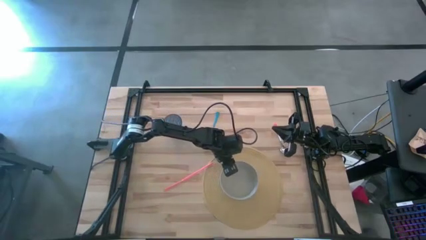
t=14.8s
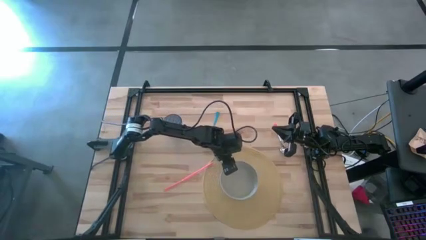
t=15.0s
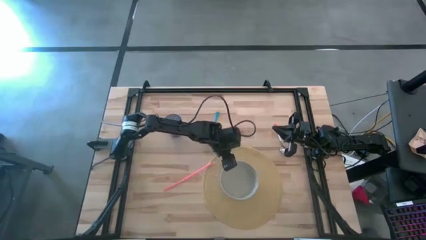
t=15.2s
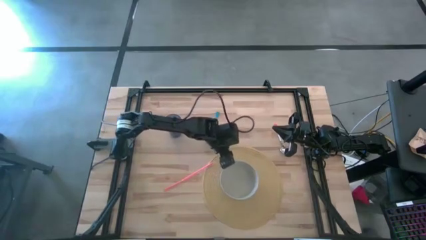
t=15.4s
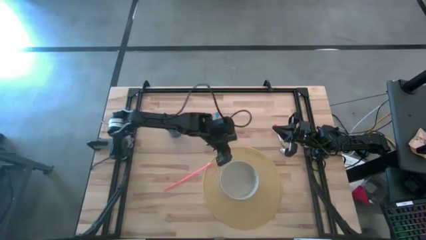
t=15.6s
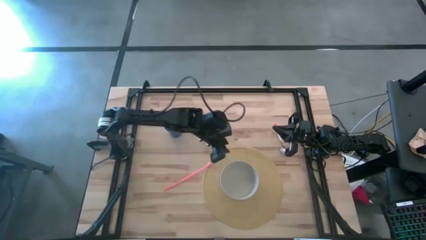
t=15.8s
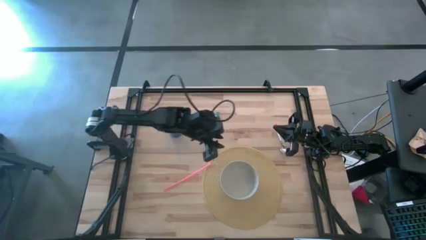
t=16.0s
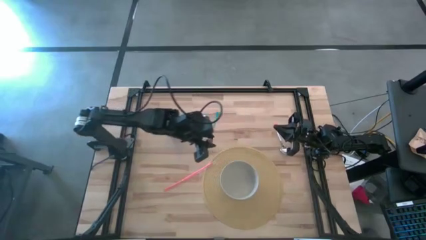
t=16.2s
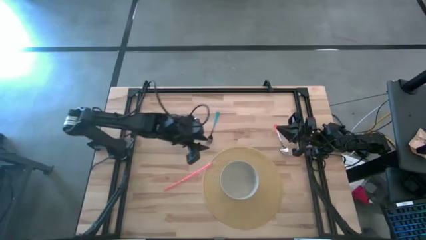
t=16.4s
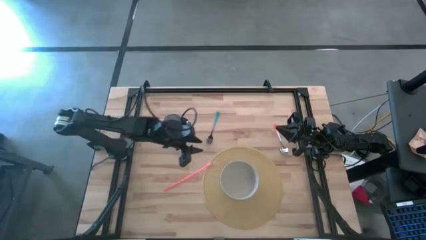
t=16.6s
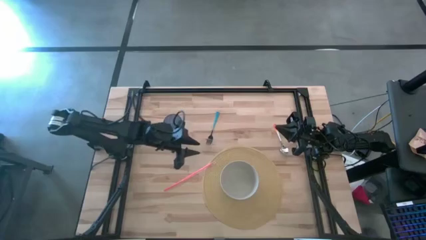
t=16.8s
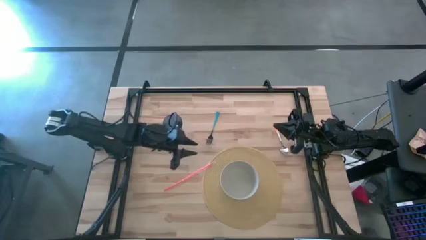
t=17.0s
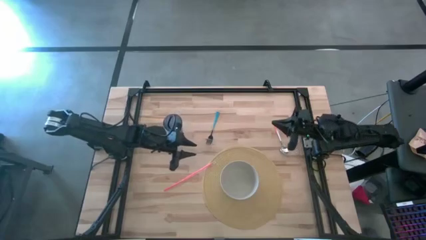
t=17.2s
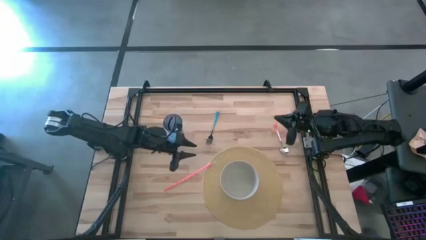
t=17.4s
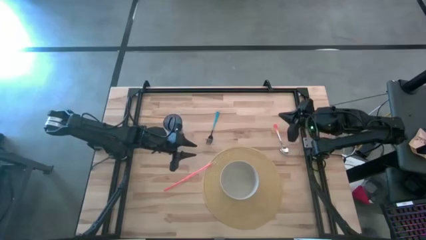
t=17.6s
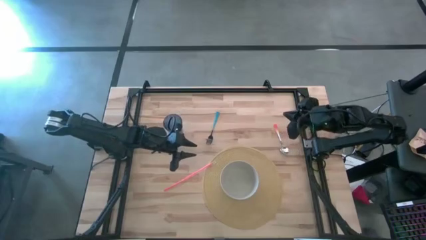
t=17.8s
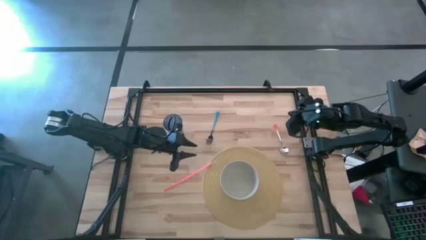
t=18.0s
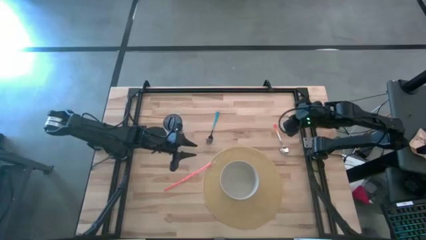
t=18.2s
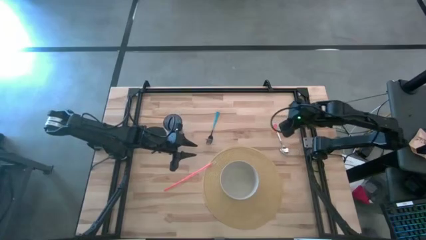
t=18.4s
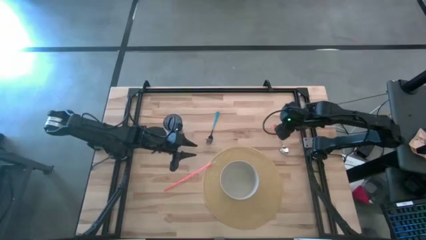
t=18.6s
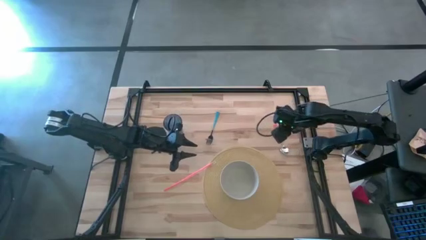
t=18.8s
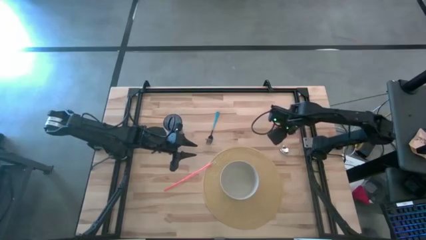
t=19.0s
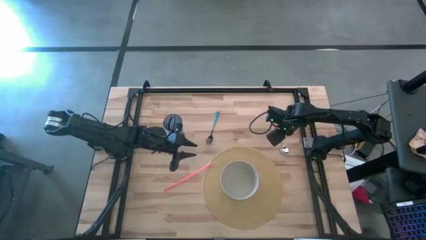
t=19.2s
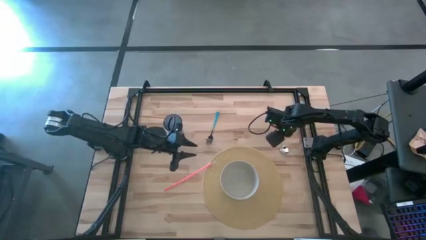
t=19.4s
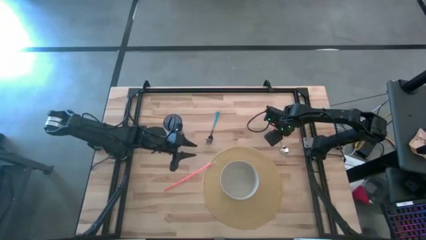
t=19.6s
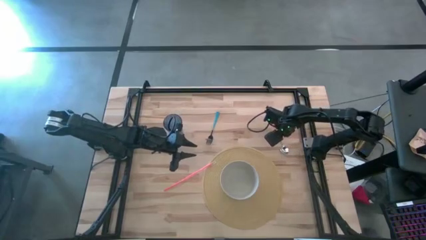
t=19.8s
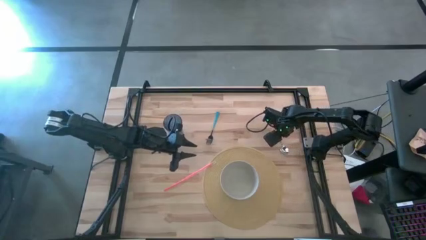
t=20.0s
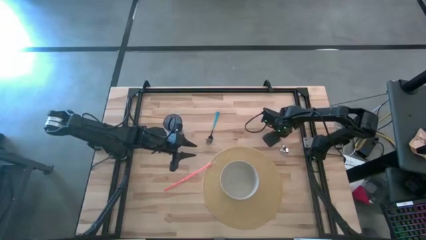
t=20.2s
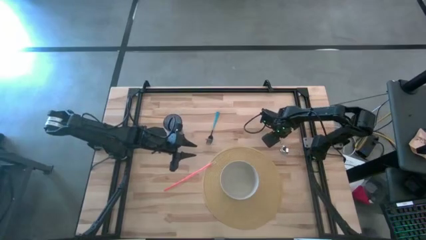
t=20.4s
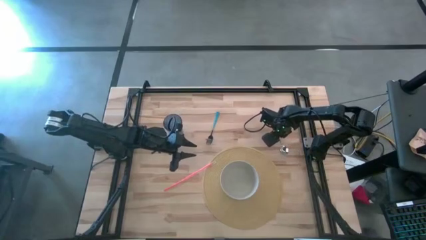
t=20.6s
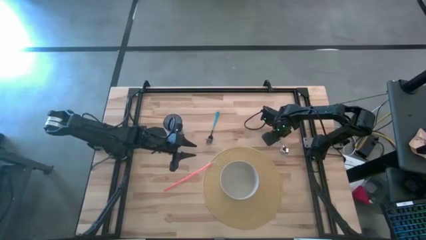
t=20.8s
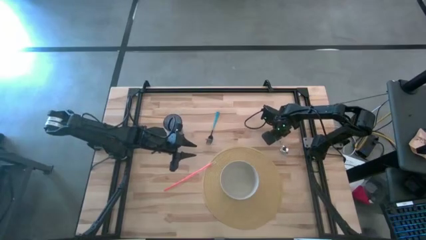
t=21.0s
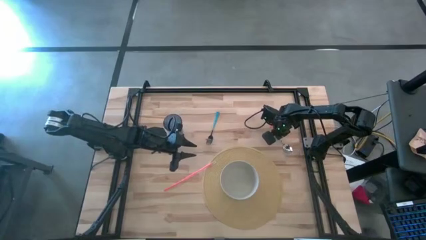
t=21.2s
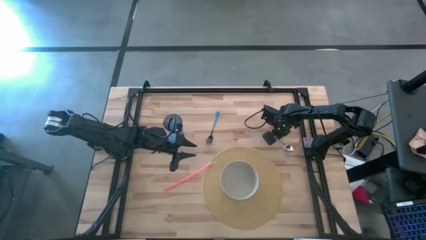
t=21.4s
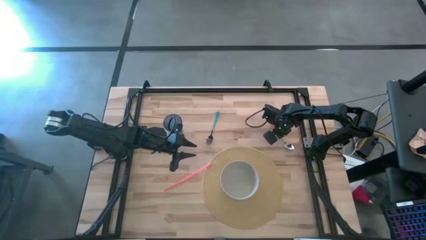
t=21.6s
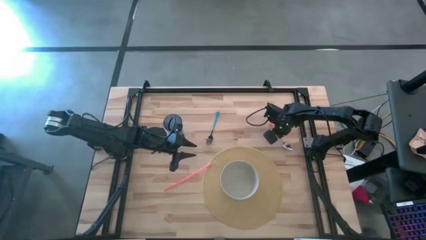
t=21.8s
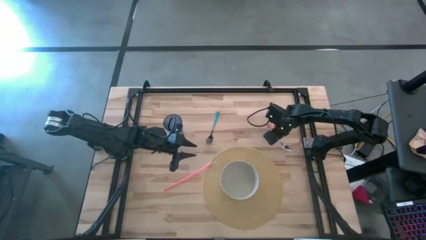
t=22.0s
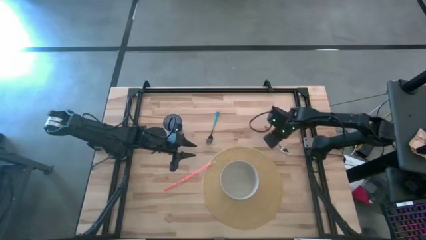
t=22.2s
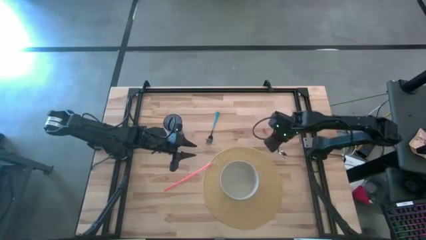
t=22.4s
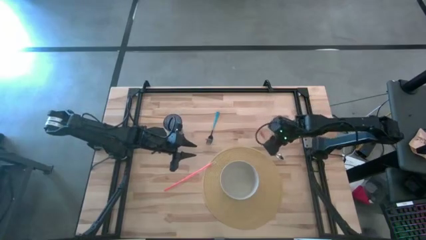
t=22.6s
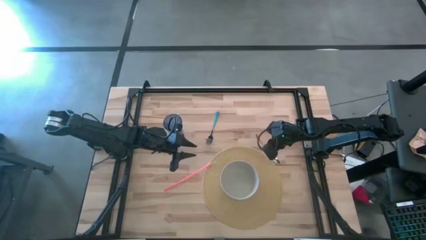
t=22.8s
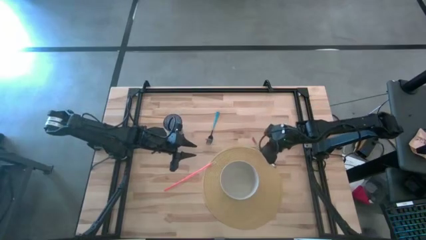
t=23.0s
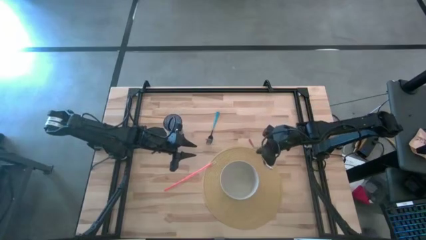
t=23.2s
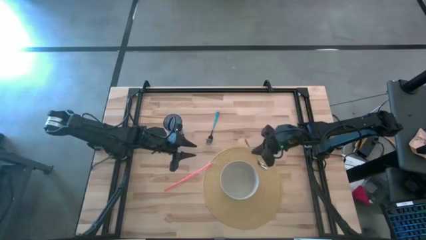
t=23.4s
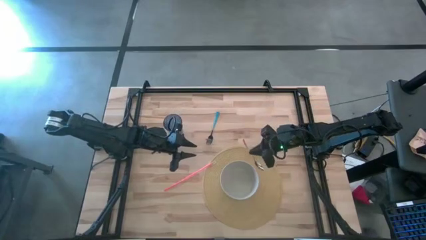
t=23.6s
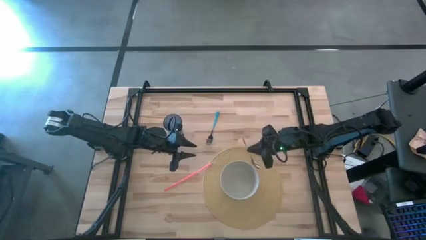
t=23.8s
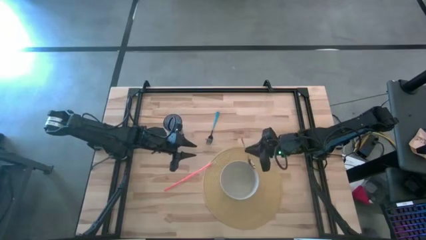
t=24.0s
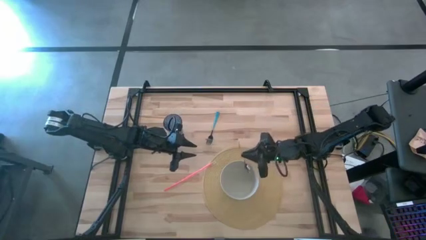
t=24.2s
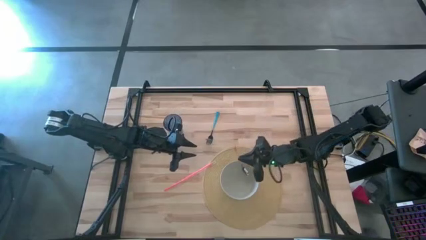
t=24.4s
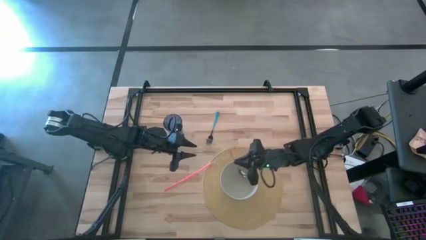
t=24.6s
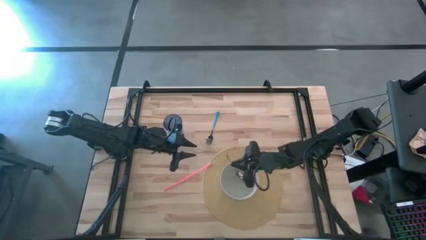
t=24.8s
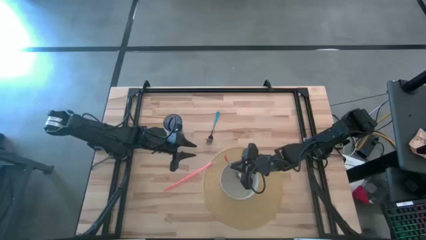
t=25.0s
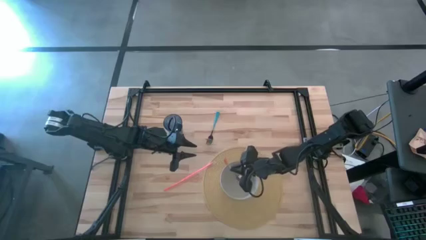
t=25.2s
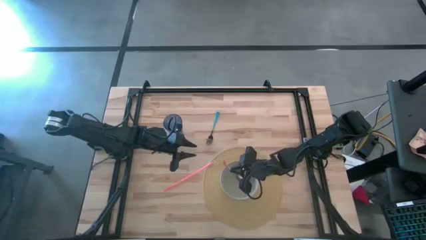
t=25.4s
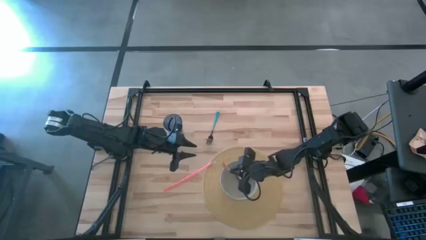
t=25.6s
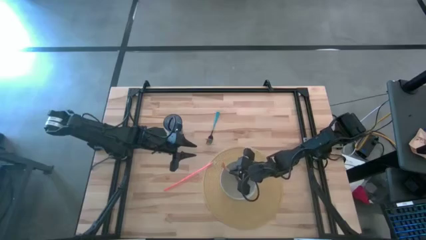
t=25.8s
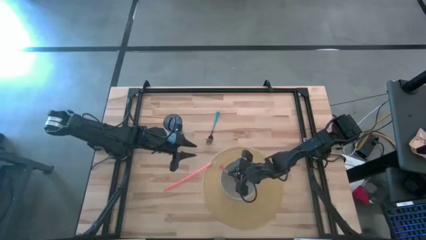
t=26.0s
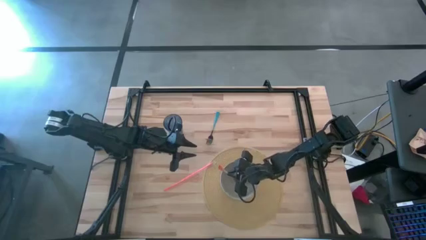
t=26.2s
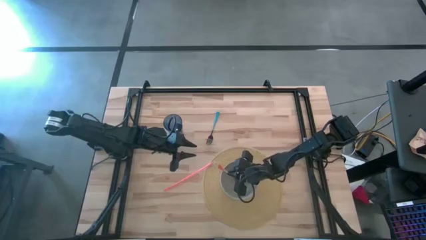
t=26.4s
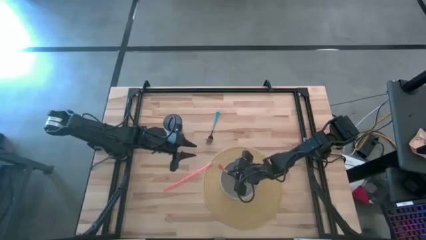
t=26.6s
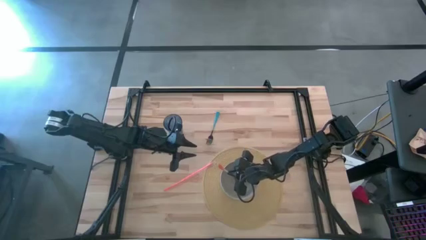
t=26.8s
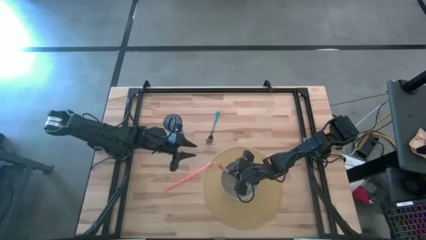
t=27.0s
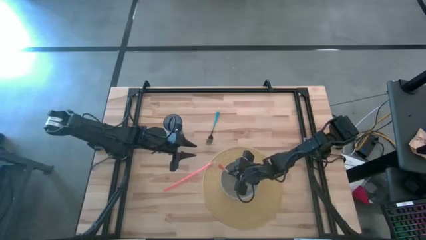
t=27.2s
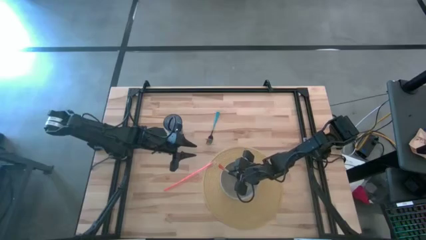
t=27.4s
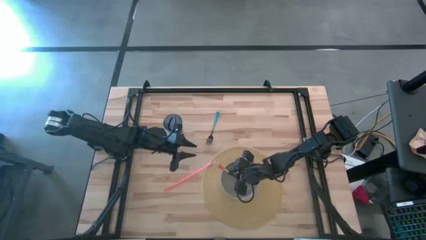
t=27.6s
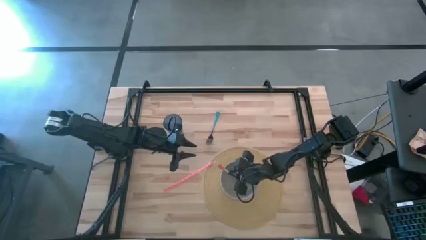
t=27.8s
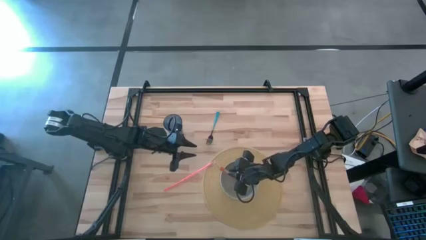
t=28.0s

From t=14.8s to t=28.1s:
Task: Pick & Place Utensil
Put the orange spoon into the gray bowl

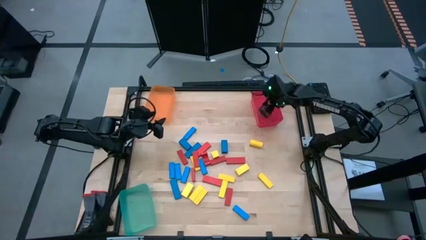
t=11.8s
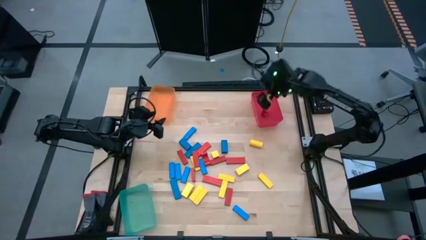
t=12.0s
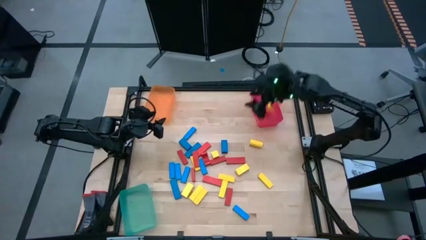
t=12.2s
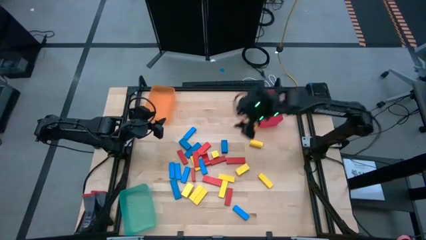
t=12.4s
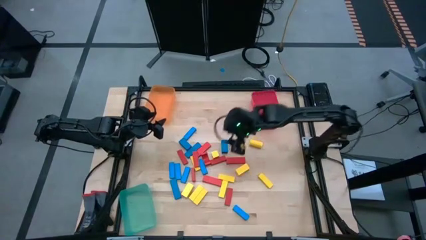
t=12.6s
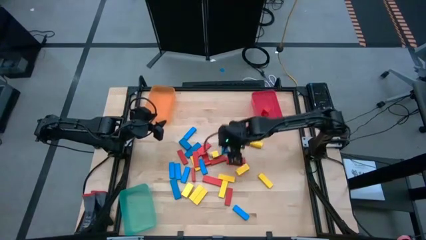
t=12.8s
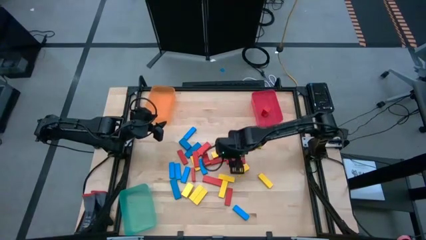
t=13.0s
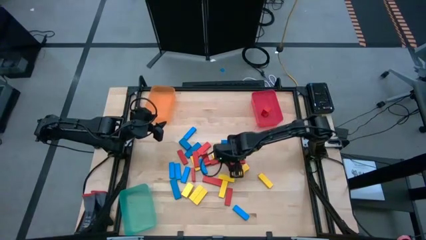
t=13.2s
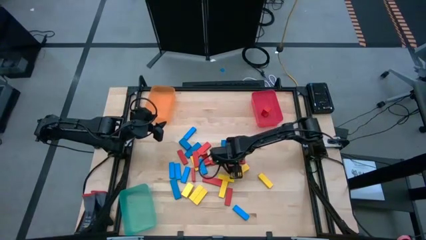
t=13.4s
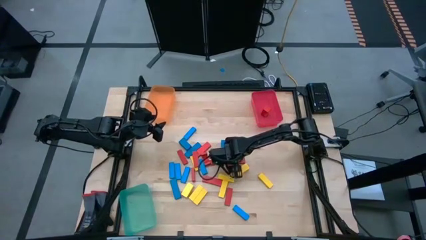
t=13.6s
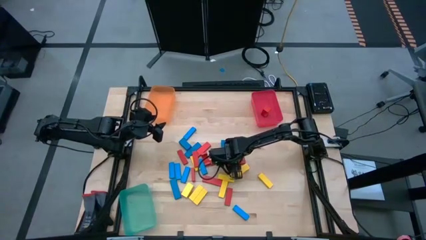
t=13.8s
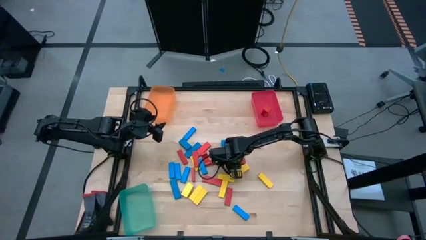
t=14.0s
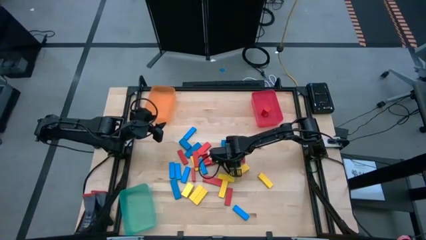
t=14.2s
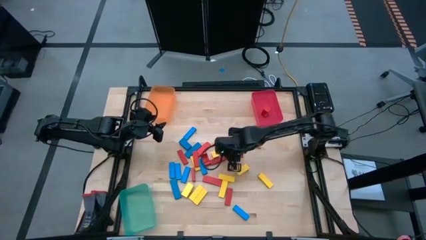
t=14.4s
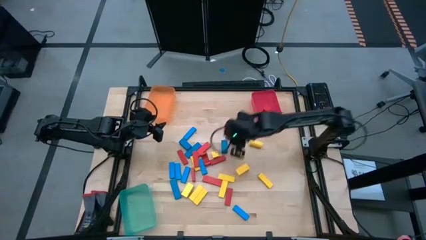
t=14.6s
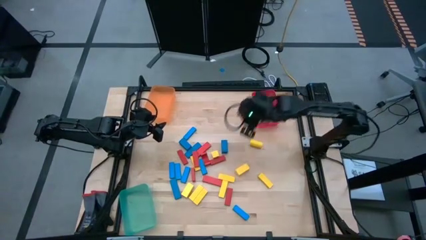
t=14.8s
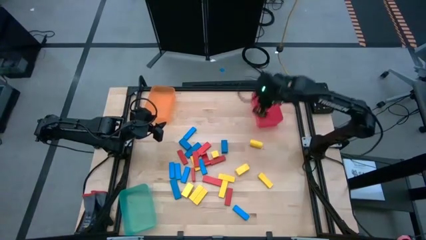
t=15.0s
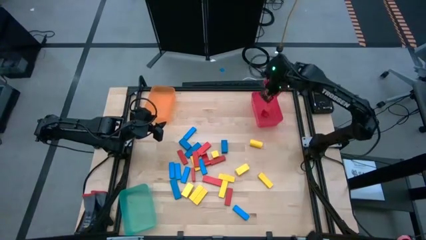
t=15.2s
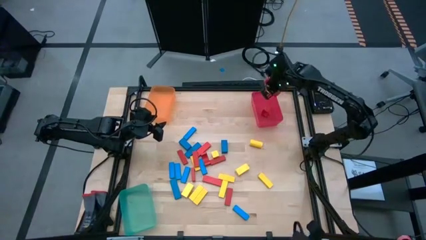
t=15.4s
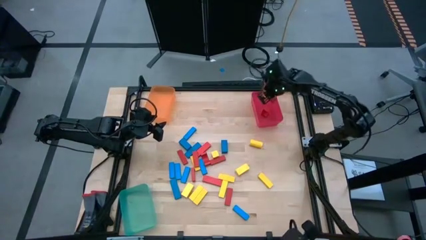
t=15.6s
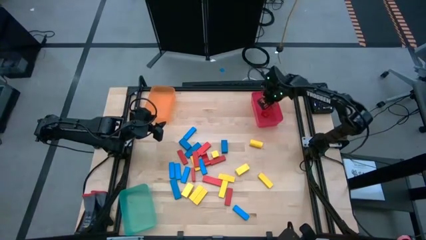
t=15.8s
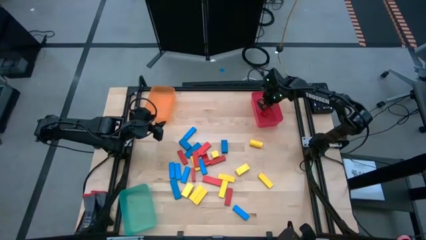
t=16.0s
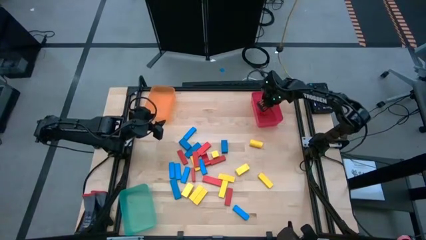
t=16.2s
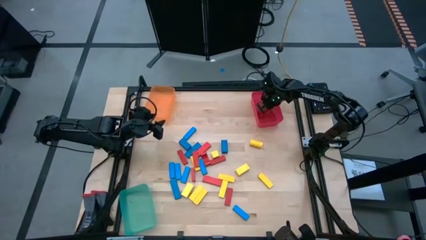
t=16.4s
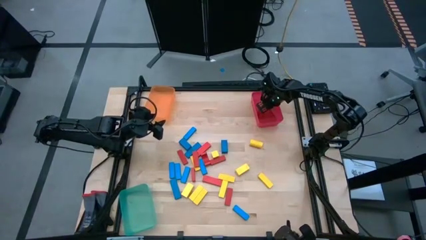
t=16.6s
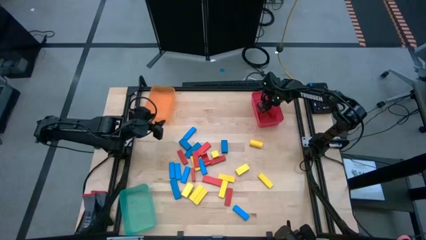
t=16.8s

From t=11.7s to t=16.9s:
Task: Sort blocks
Put the red block into the red transparent bin
